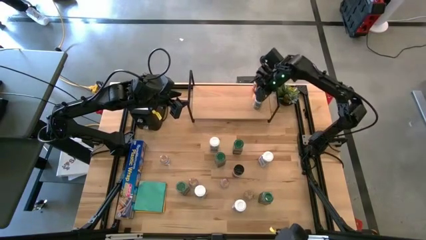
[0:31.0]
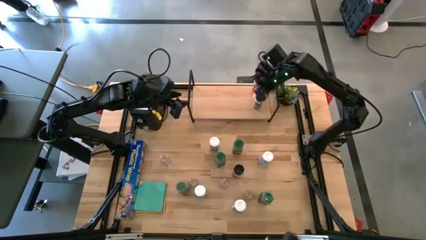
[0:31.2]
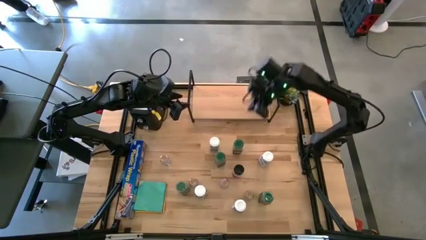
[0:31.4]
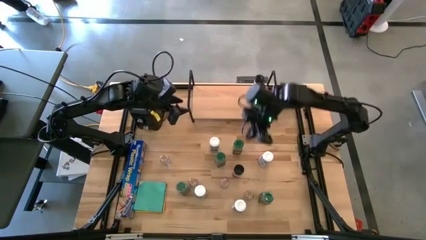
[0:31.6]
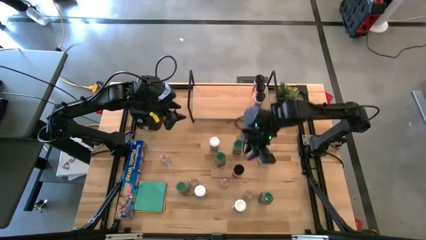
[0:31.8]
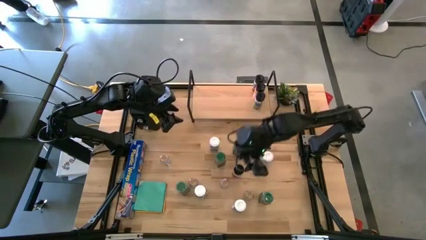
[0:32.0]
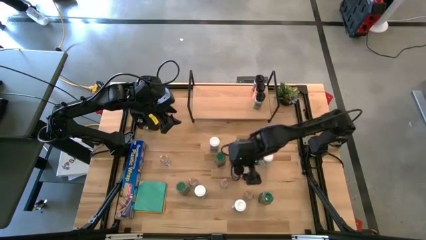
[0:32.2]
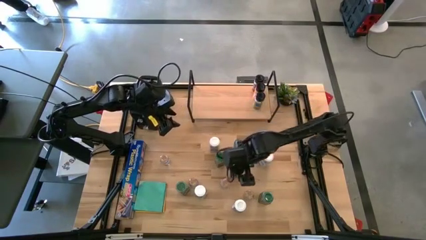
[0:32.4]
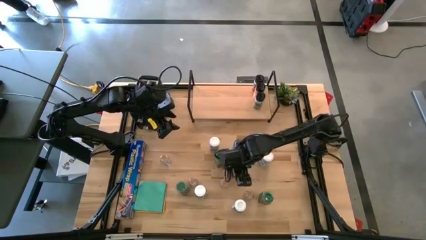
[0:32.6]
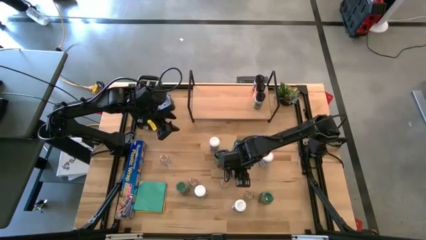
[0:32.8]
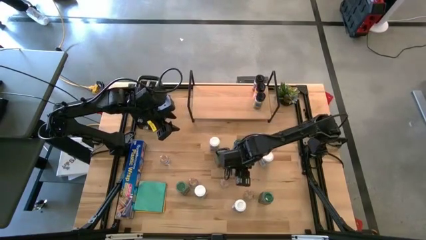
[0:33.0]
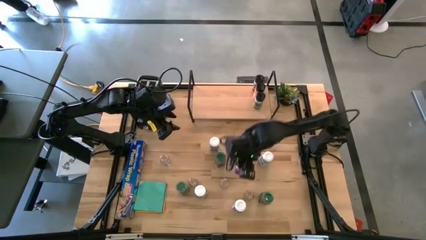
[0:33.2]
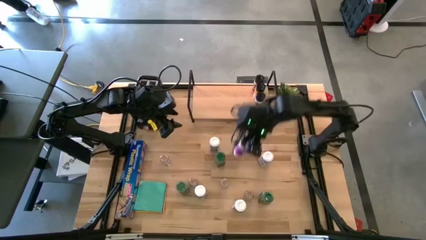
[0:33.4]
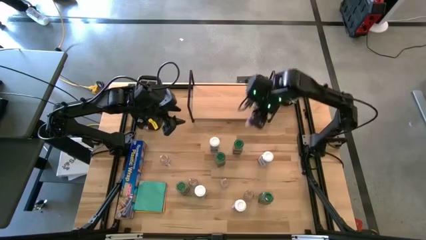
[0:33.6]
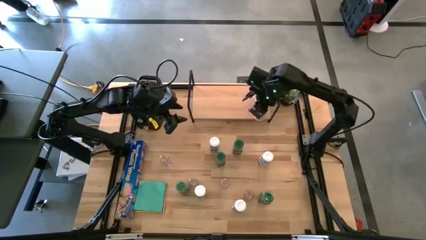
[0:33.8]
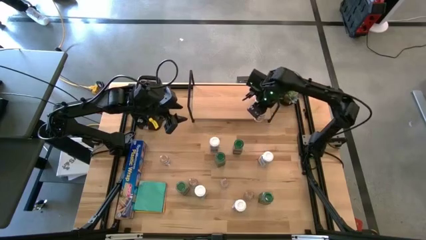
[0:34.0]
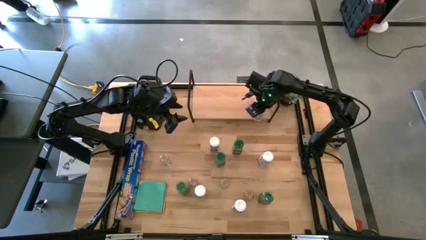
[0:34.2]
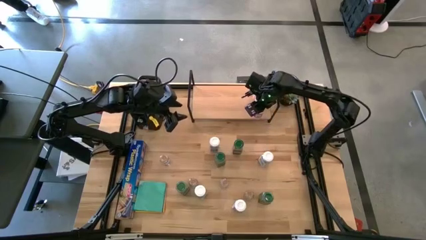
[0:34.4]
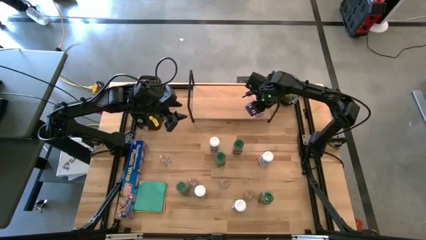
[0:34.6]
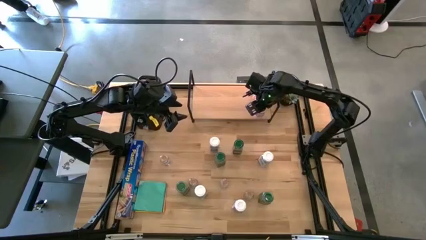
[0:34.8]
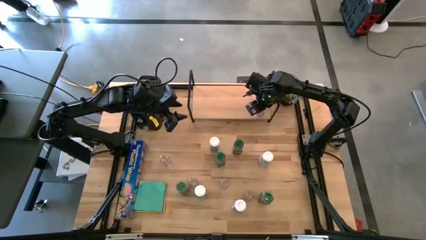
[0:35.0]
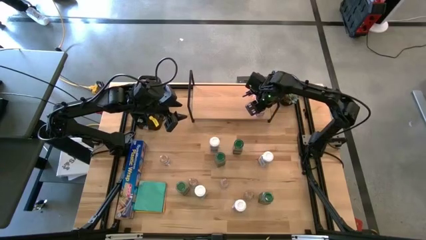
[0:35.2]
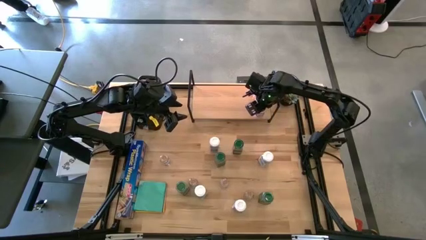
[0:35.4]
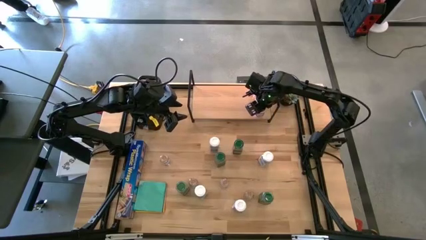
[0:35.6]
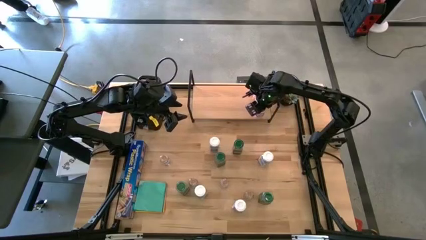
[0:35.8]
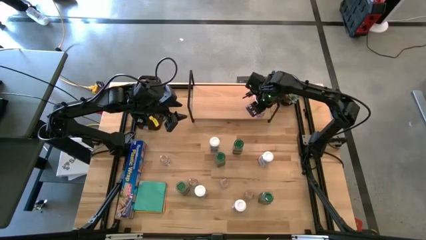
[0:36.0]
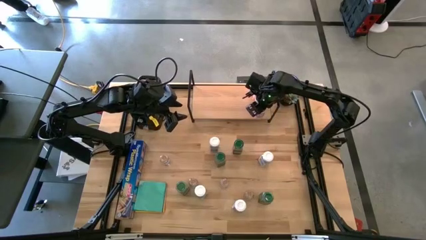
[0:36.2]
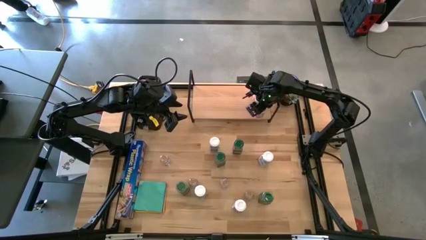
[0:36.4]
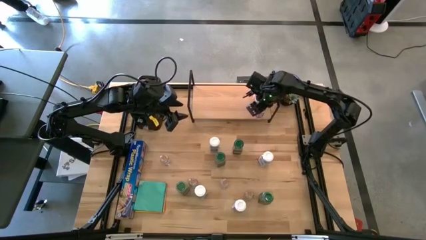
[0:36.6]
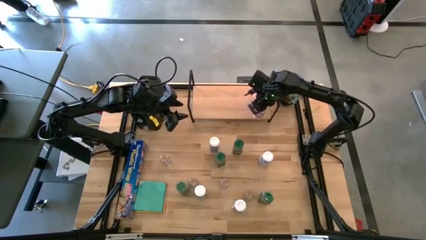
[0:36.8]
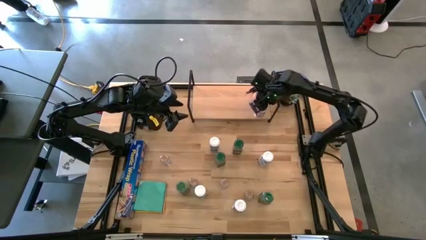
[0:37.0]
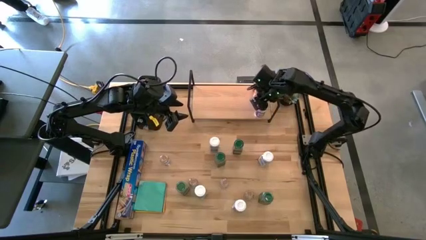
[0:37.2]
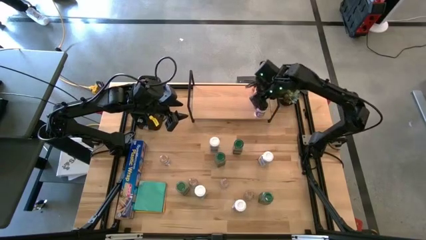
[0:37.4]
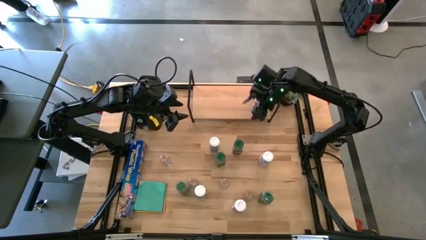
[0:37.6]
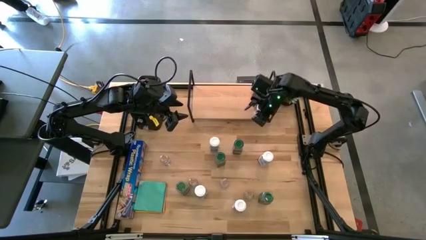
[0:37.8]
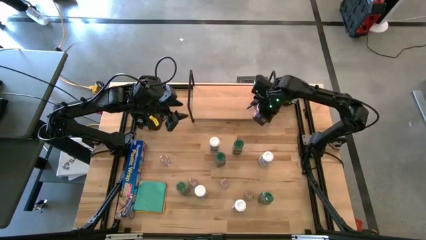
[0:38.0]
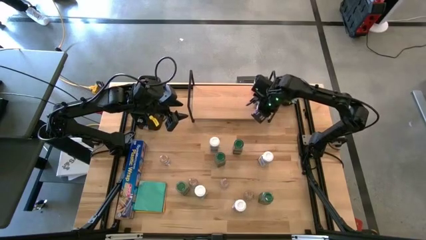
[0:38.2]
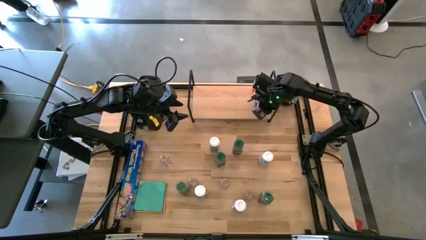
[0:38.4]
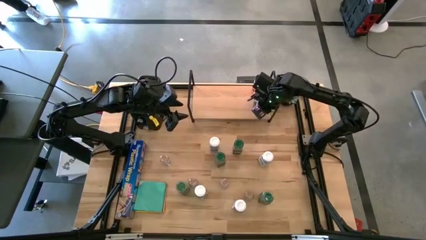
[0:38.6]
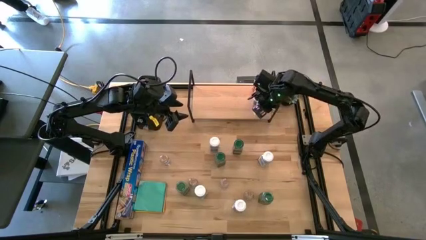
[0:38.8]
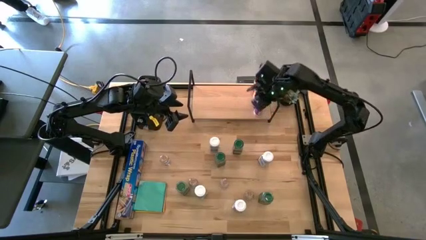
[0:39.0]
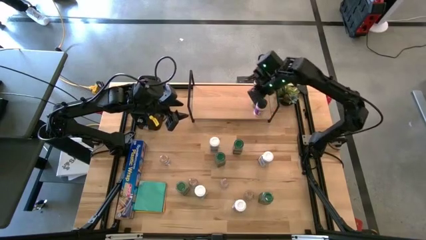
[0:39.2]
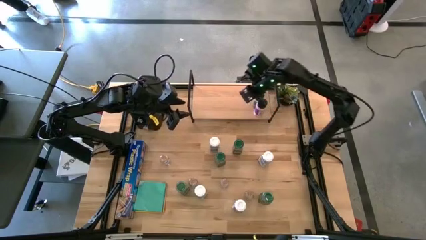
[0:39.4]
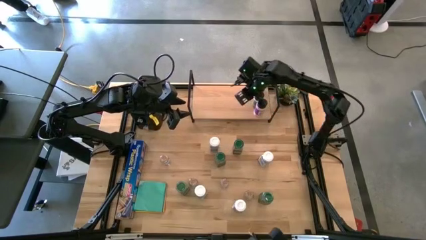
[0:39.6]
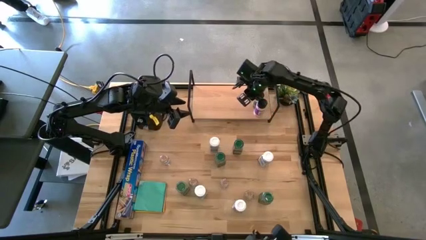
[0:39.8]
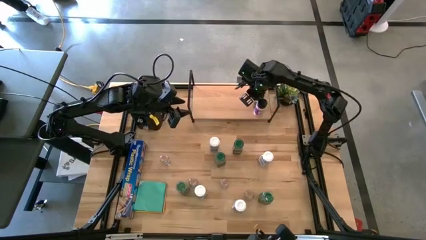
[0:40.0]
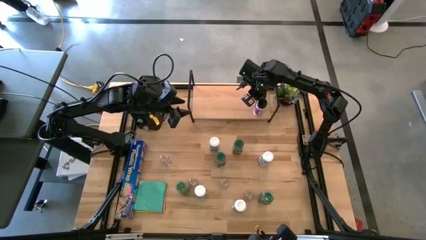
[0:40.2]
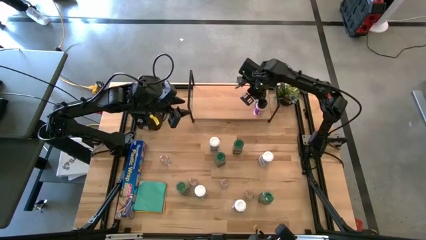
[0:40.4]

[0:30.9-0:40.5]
Task: Shelf spices
Put the black spice bottle on the shelf and align with the other black spice bottles

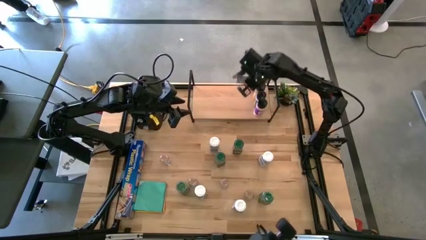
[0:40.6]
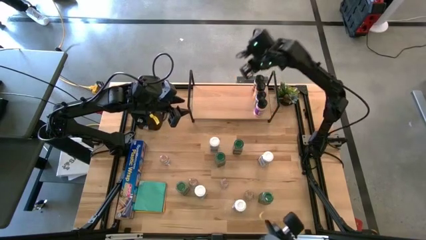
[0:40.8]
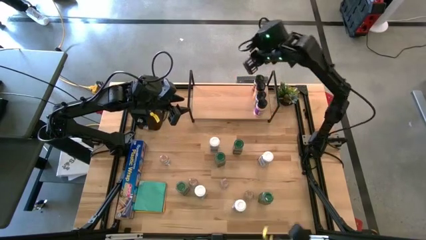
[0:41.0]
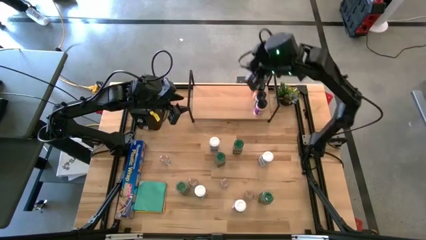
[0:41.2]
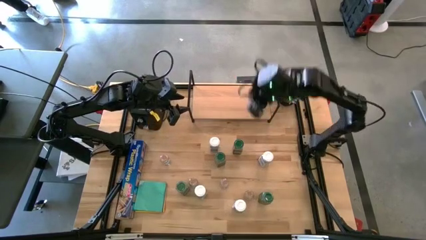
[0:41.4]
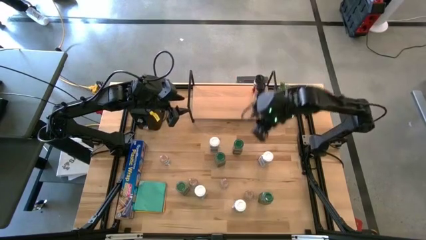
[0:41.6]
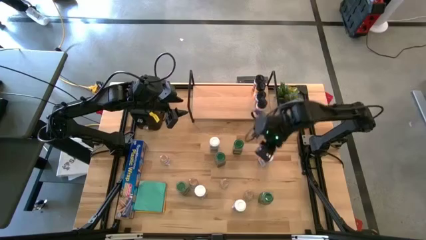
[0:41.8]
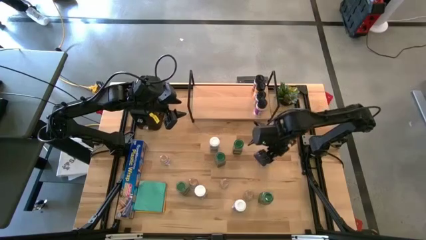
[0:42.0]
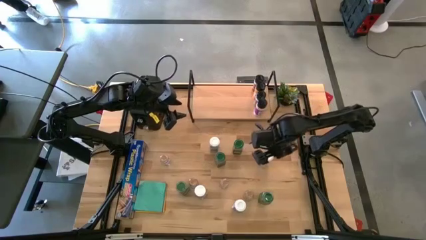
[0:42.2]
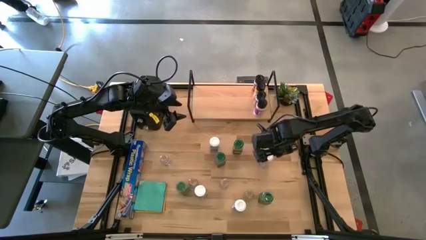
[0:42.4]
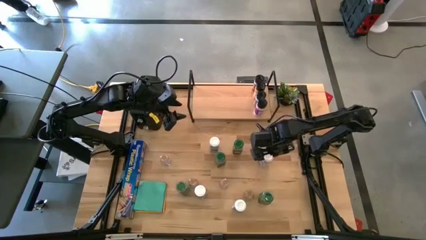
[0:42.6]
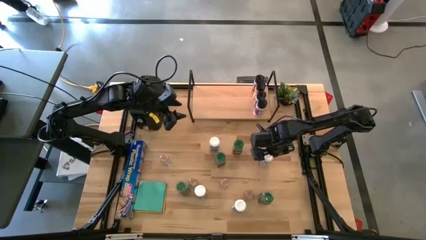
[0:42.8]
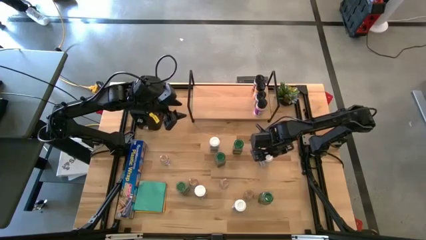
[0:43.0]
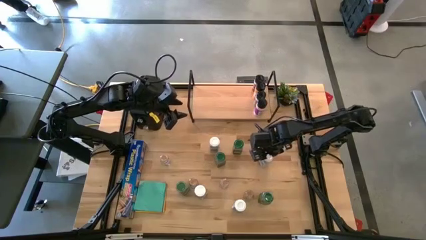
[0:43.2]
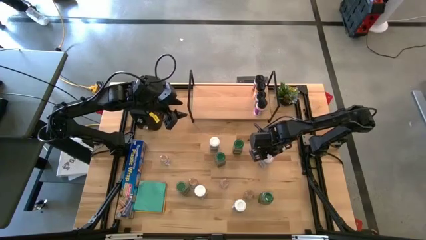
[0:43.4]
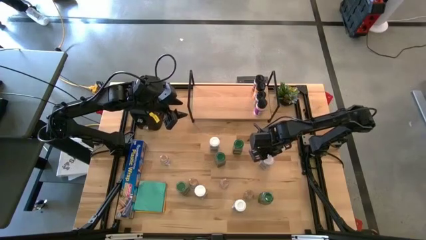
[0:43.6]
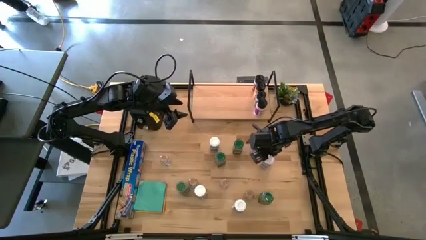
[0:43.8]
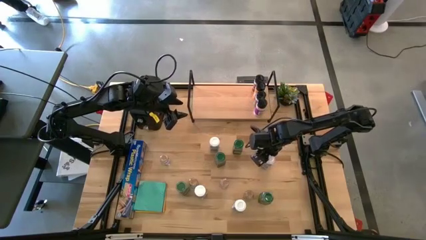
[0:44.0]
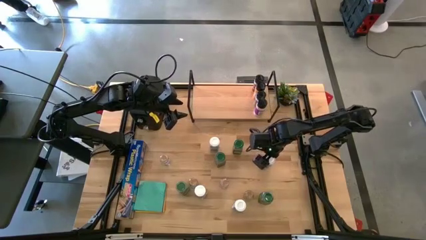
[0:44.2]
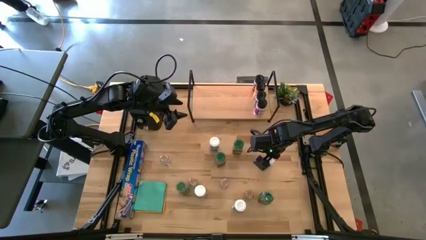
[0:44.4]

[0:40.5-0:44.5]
Put the top right white spice bottle on the shelf

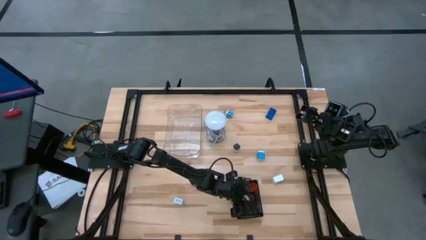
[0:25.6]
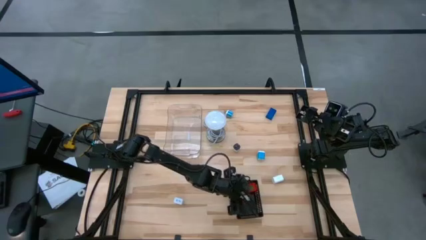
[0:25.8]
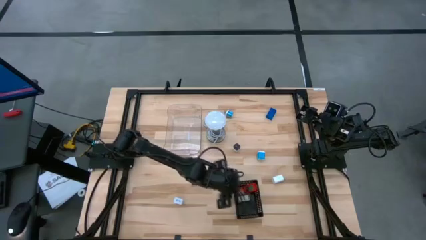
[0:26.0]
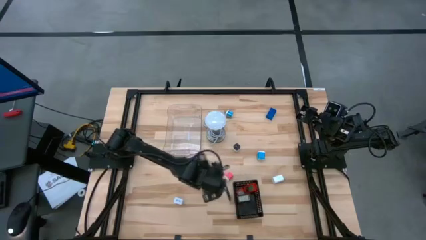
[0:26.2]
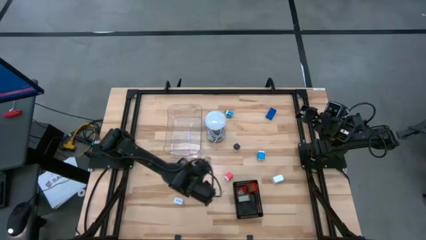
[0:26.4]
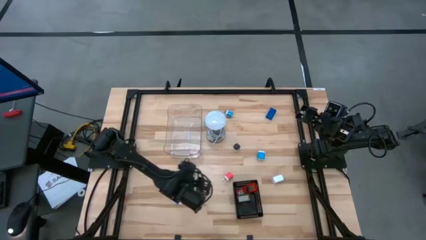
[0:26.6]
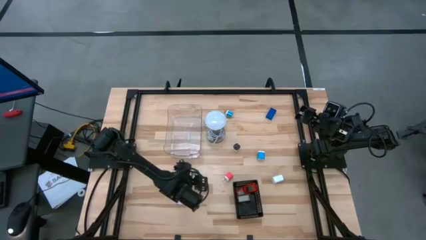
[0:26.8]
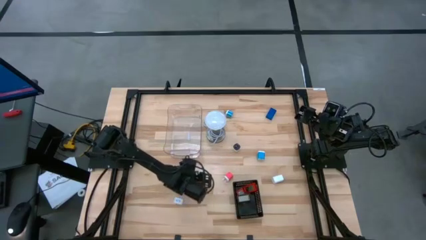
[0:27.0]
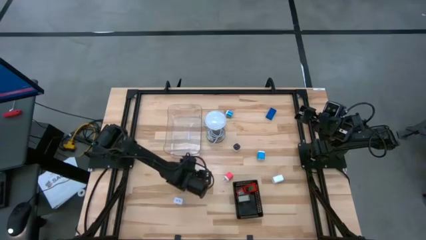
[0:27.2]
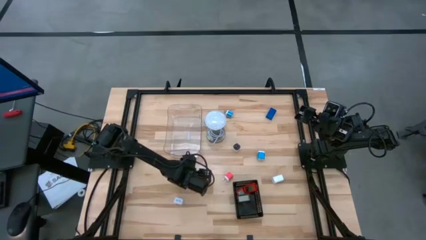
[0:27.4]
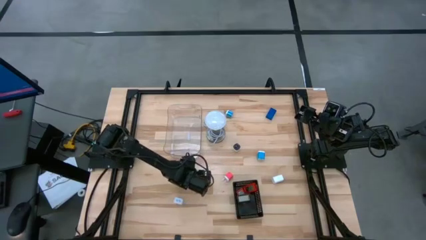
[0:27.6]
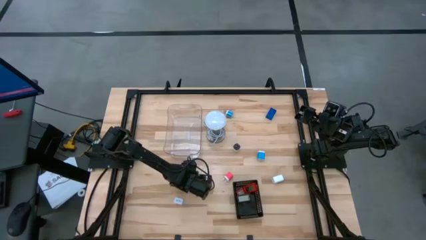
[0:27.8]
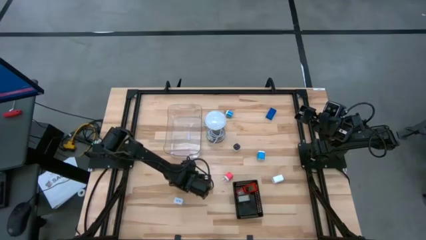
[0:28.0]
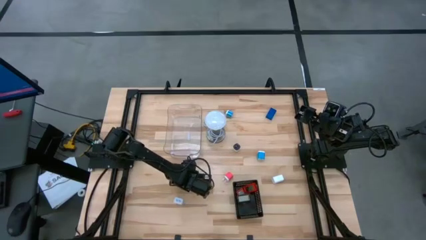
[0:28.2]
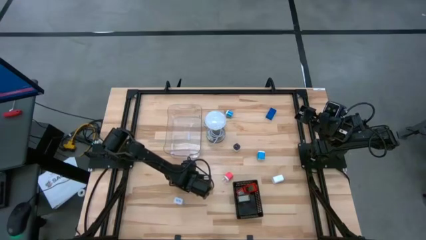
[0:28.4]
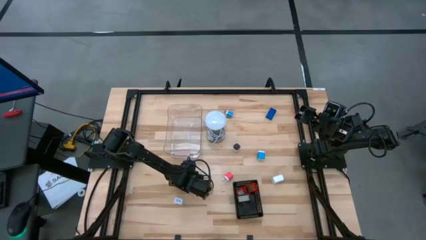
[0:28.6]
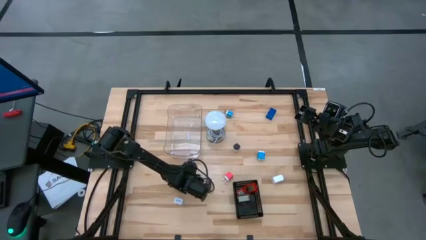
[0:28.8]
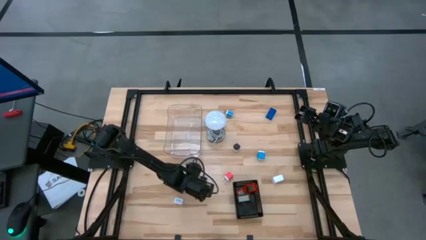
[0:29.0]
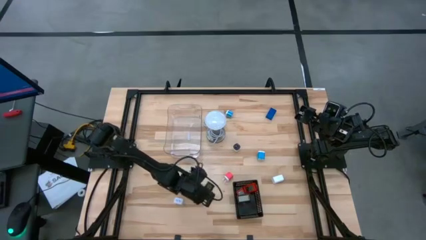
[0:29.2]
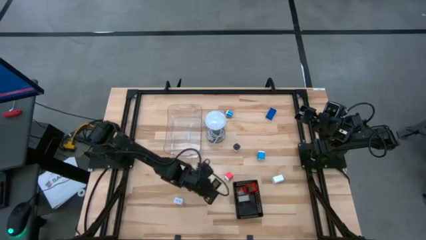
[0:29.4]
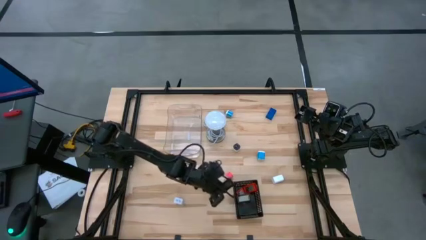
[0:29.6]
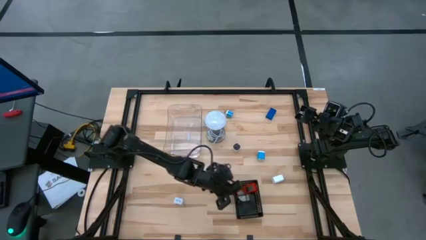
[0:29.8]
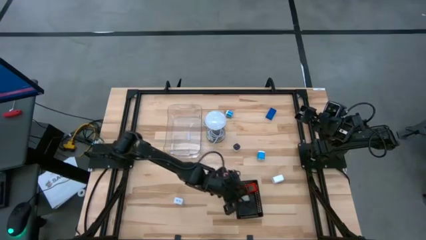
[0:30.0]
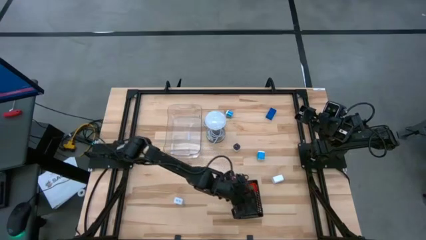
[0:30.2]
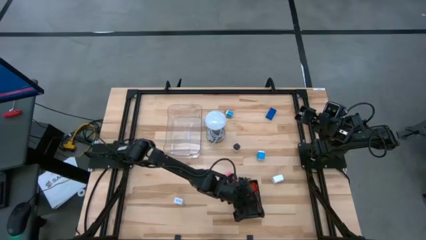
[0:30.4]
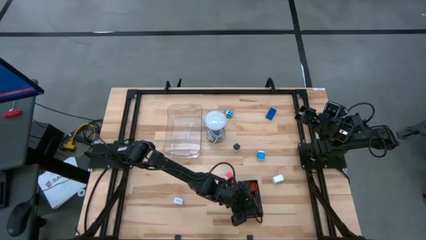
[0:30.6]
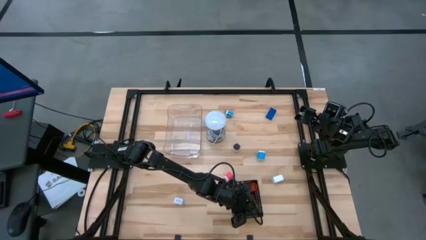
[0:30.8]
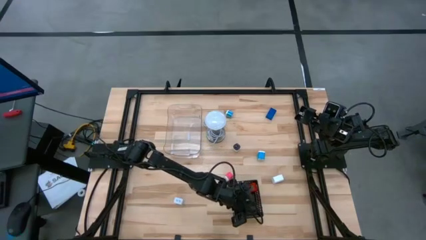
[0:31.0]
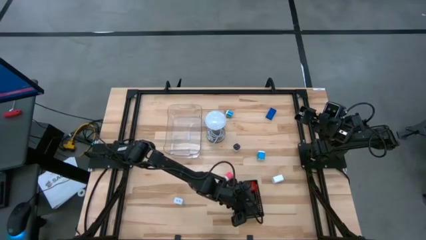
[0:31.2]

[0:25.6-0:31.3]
Task: Pick & Place Office items
Put the black digital clock into the black bin
